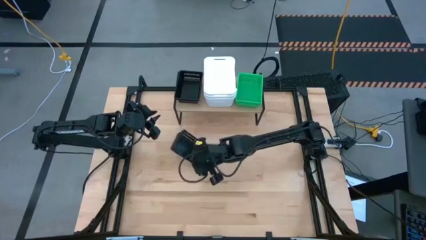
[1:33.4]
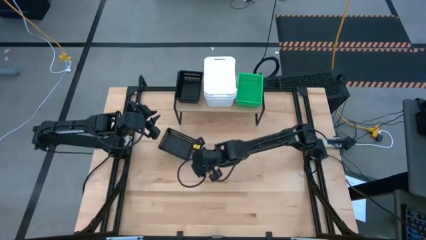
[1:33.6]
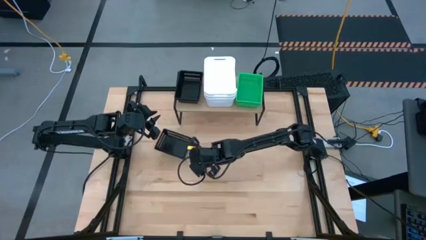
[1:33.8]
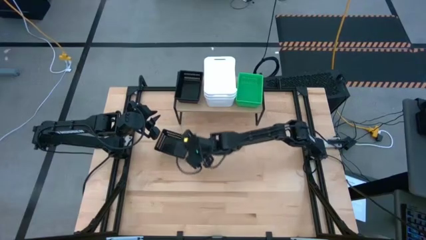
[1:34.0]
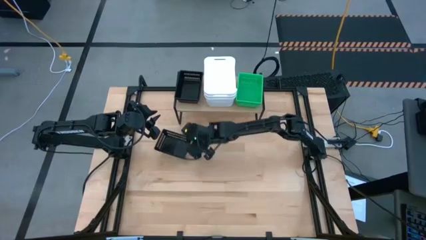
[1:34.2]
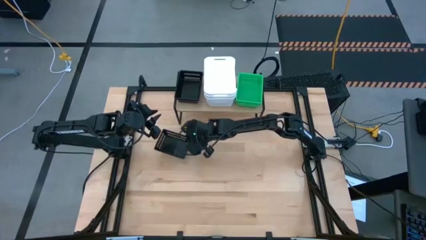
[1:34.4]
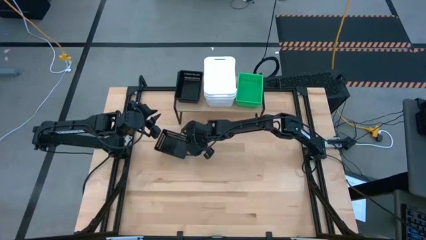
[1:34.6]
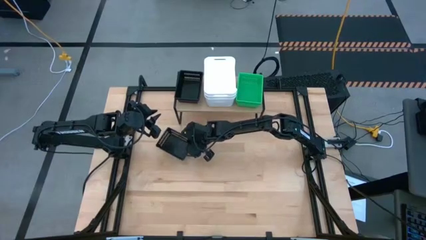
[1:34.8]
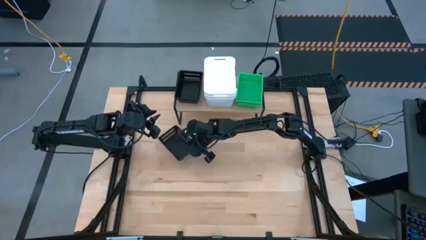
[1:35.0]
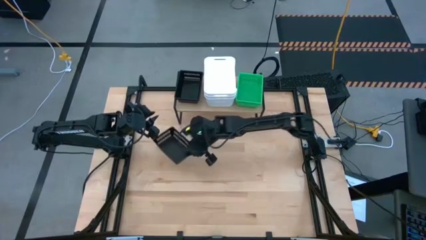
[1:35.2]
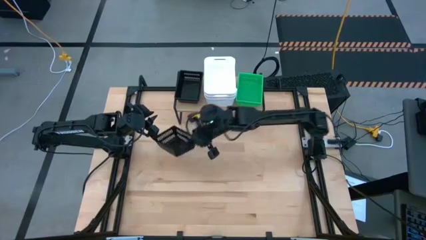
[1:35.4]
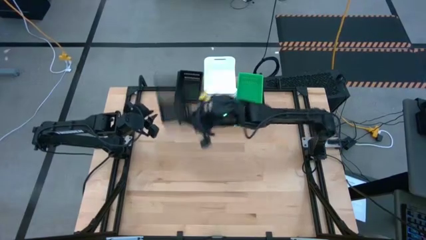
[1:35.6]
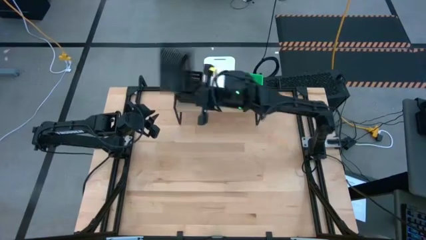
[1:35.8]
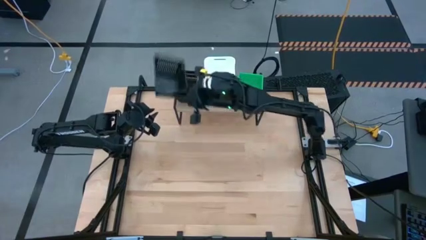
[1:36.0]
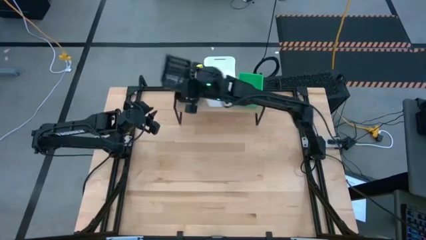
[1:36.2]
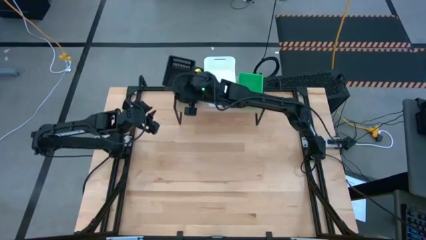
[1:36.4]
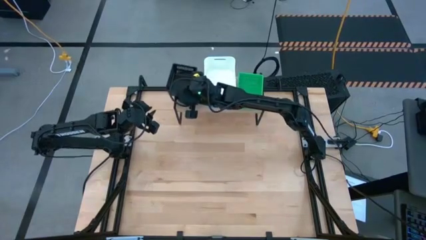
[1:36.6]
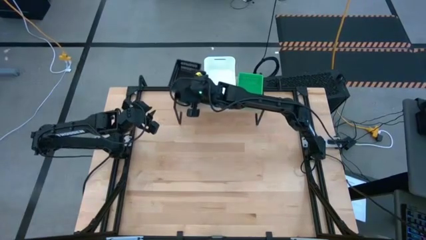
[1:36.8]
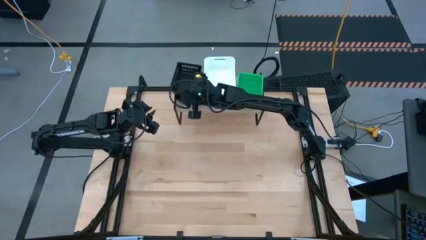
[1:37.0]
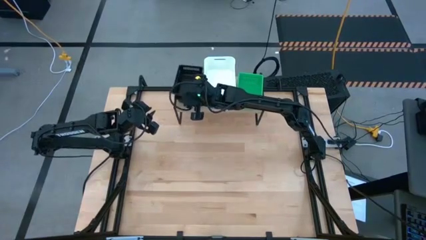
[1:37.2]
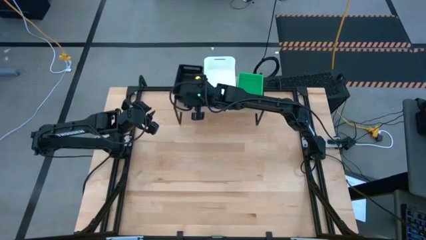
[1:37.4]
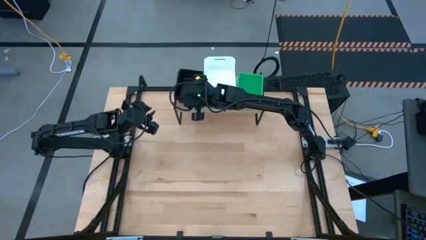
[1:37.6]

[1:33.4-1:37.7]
Task: Stack baskets on shelf by color
Stack the black bin on top of the other black bins on the shelf

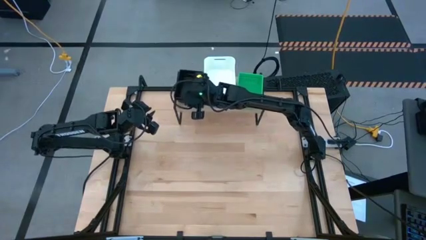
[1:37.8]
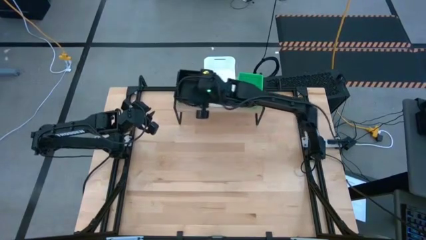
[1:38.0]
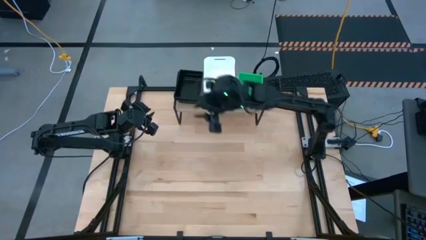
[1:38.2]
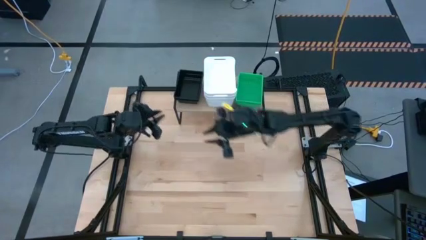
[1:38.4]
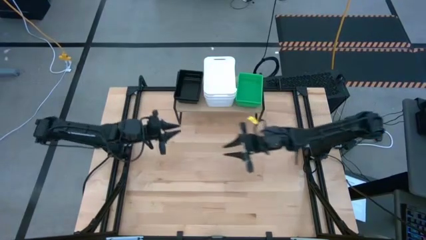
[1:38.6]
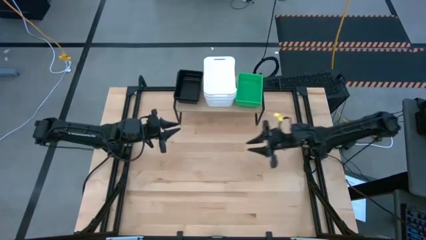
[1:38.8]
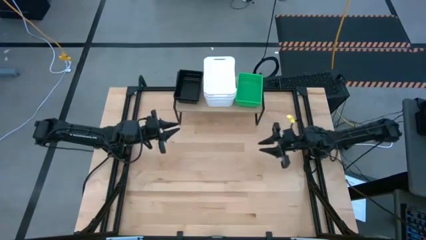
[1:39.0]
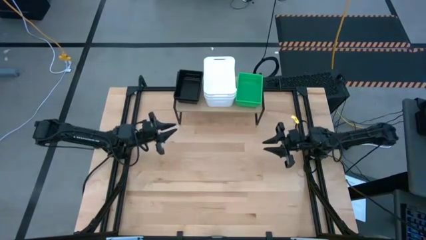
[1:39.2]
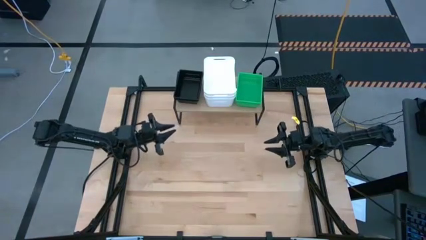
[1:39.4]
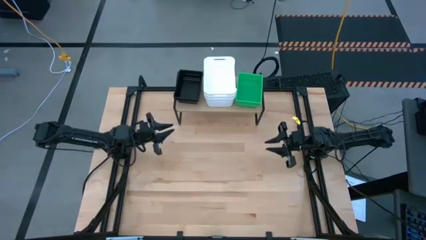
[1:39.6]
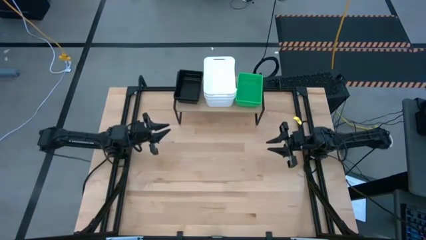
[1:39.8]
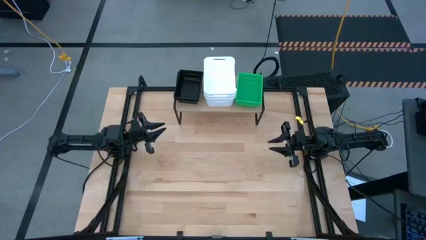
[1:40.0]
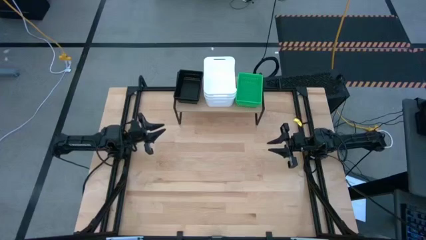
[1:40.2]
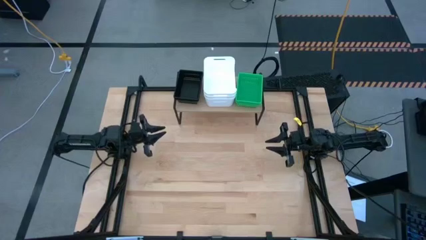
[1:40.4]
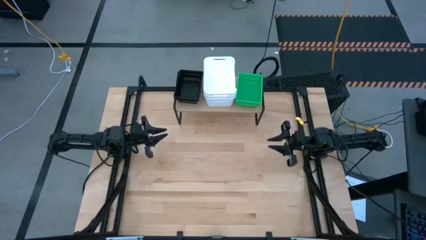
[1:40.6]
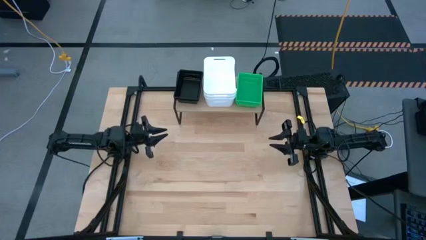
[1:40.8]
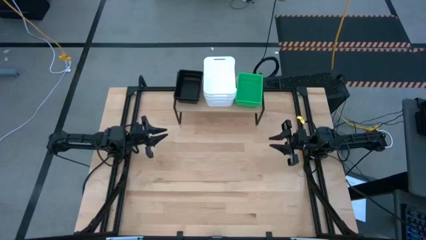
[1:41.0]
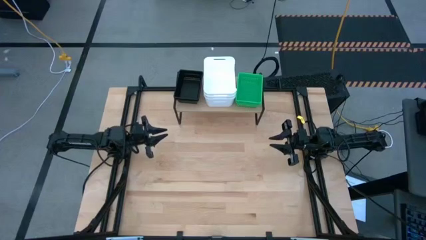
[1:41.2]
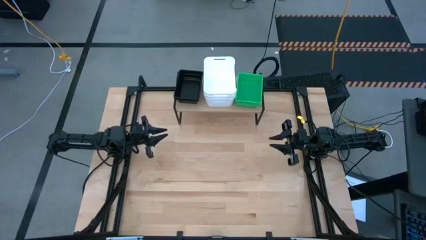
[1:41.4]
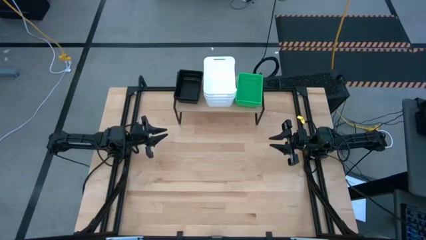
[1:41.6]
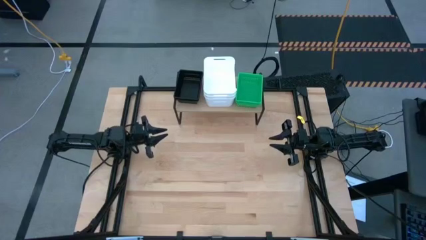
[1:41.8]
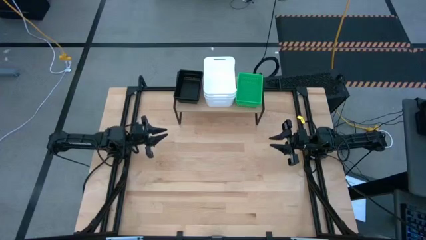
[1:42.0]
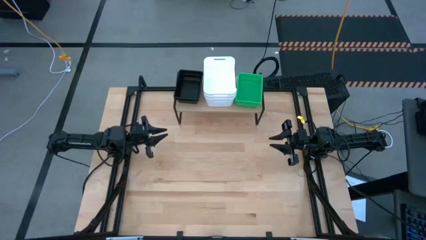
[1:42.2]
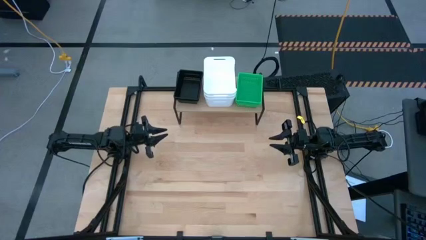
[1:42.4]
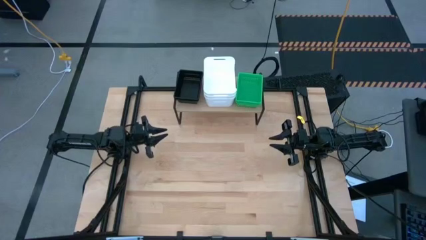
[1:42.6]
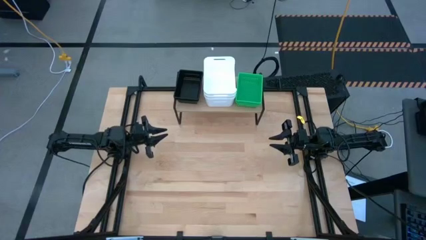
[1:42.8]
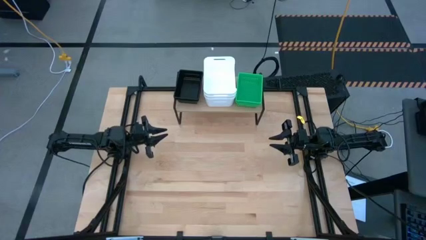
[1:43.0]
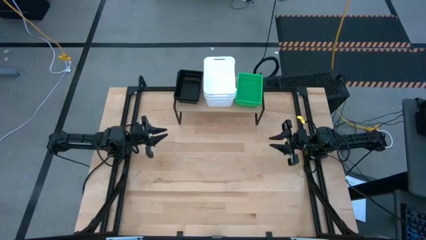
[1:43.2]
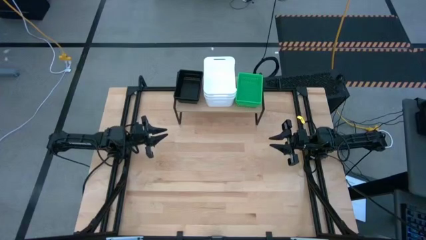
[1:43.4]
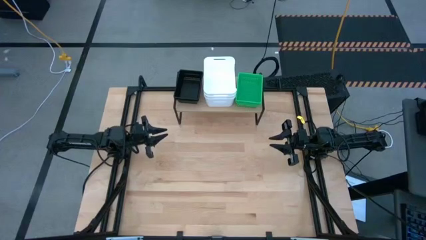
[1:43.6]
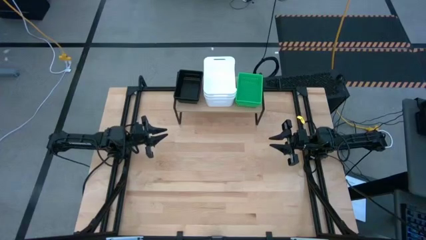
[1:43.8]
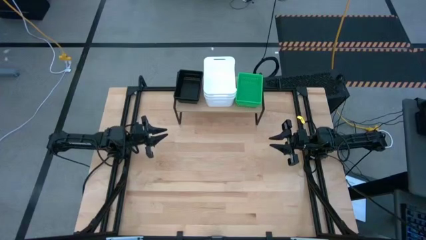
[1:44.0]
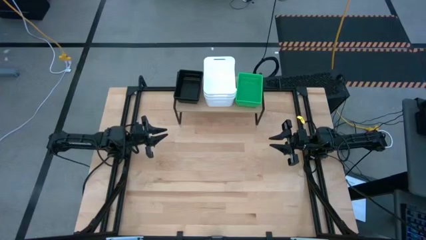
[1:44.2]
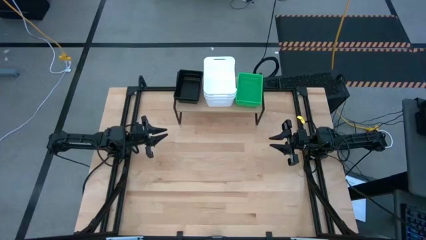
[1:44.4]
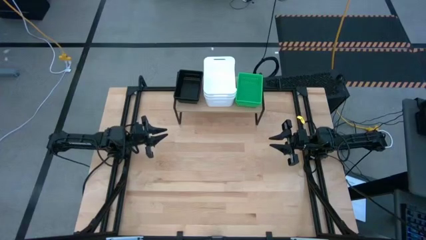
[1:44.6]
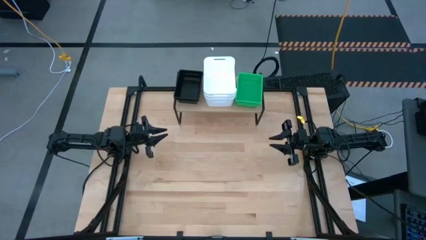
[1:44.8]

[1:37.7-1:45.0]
Return to Home Position

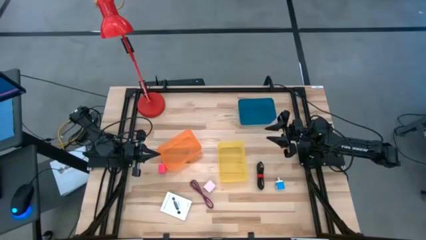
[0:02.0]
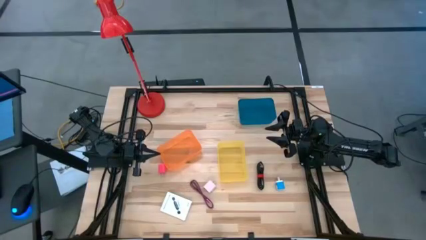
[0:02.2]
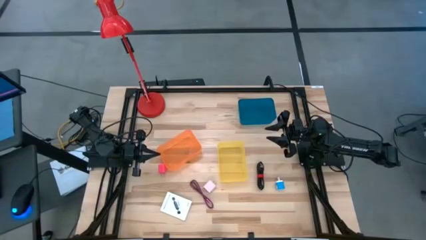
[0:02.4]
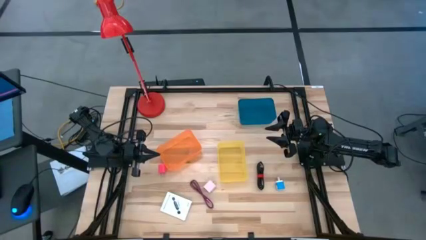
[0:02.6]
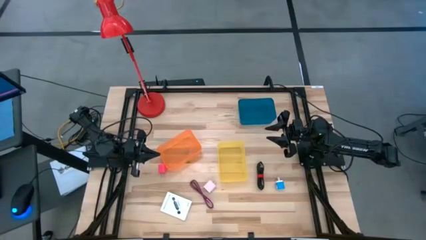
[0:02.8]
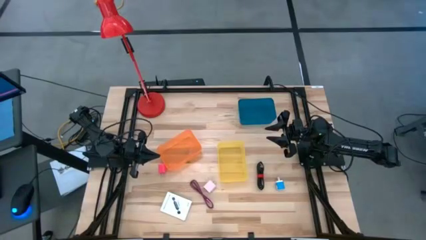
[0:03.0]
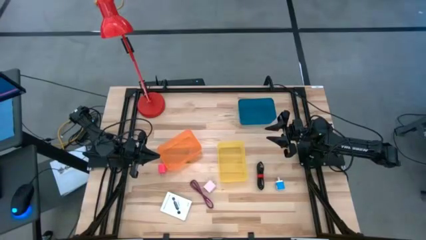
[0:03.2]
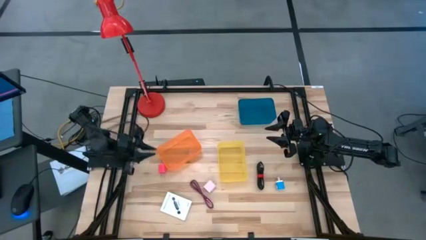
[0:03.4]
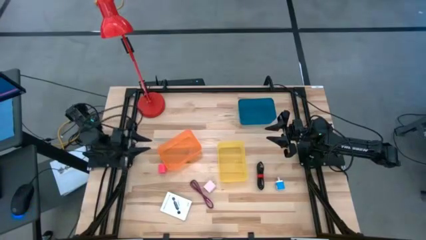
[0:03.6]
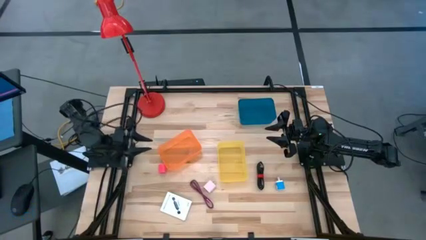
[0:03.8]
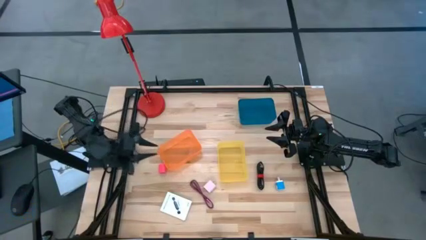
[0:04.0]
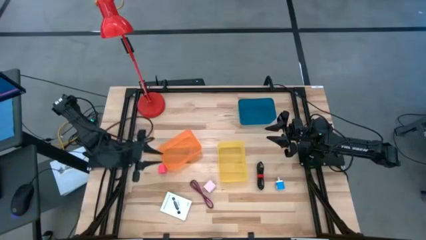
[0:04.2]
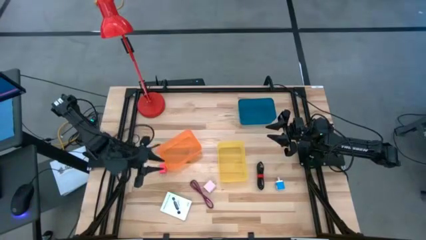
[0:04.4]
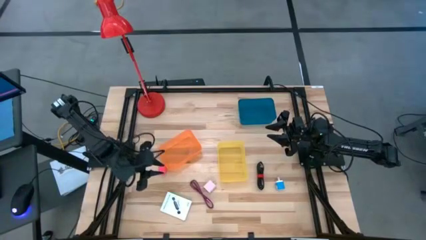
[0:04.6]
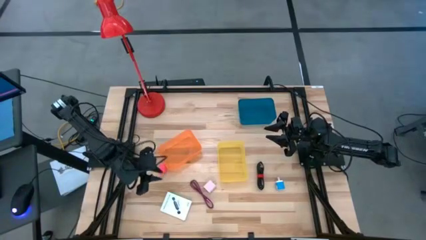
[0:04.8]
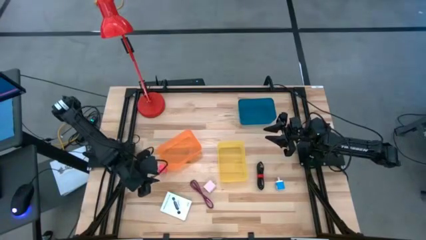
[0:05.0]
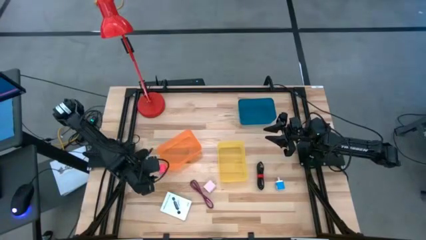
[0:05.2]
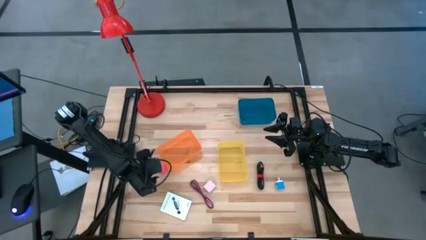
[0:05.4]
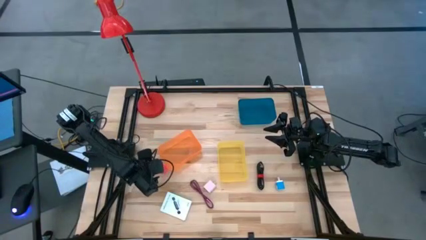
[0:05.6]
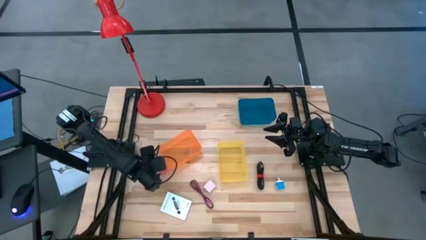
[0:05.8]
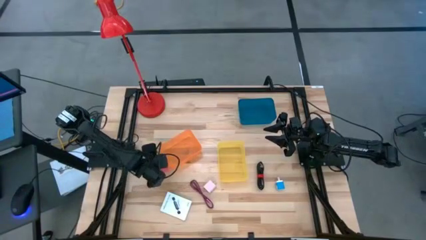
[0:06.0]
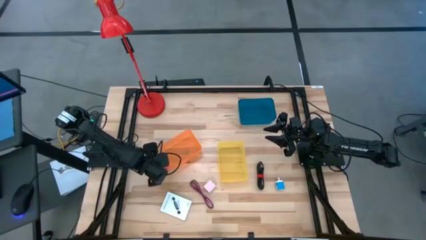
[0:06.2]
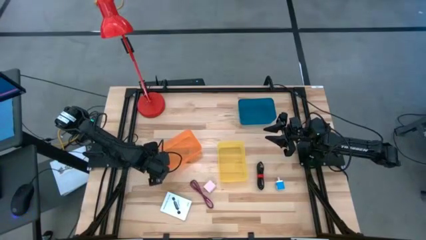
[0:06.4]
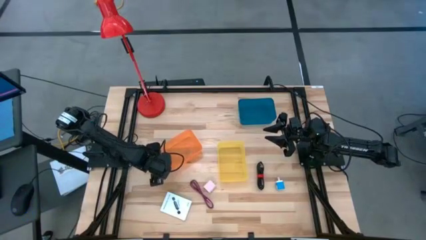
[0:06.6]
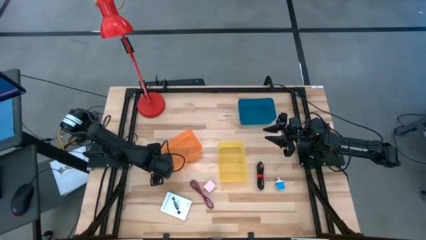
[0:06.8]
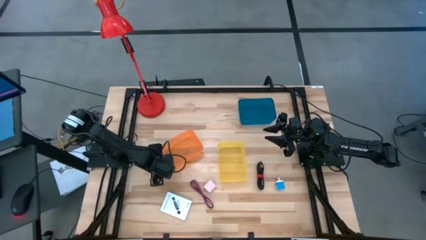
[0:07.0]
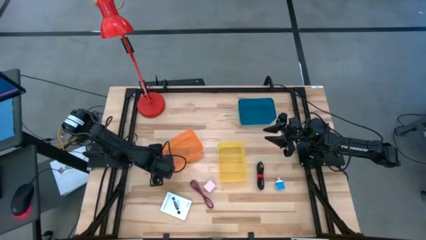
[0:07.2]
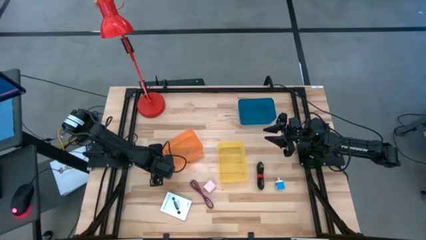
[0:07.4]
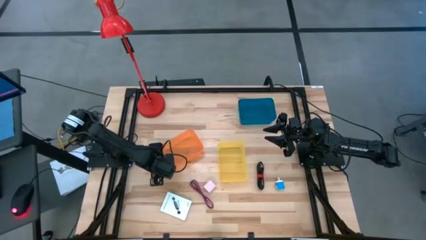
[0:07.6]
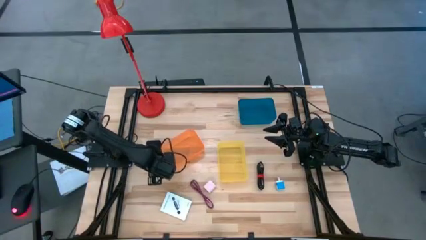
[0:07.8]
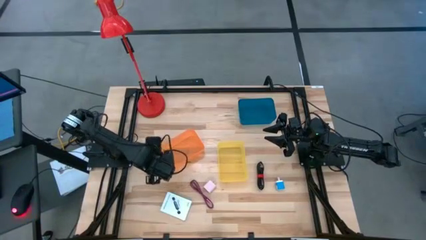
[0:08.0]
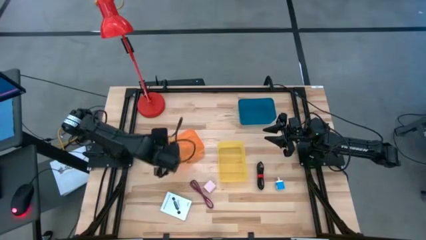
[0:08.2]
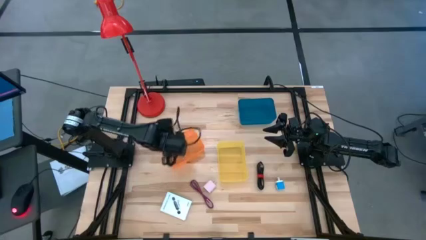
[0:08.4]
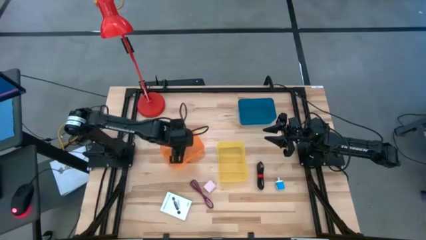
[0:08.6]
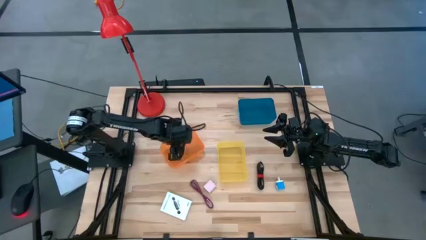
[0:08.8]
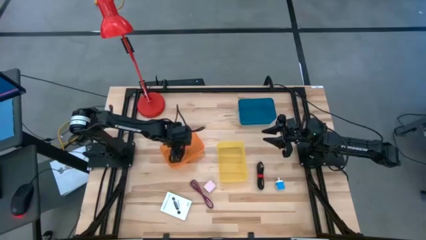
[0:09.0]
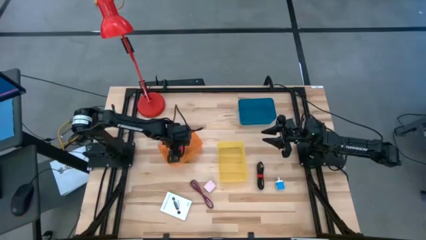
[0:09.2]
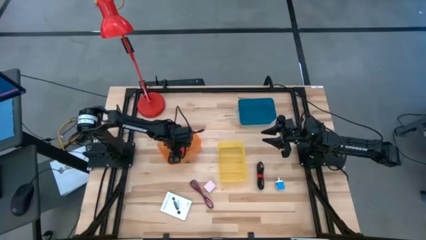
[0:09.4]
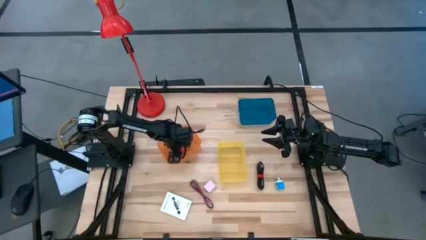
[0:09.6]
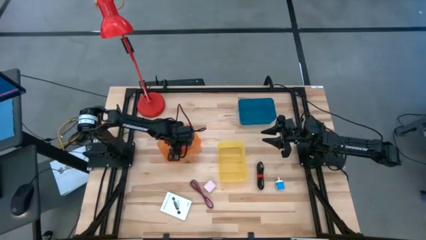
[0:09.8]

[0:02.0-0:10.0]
Task: Pick and place items into bin
Put the pink charger adapter into the orange bin
